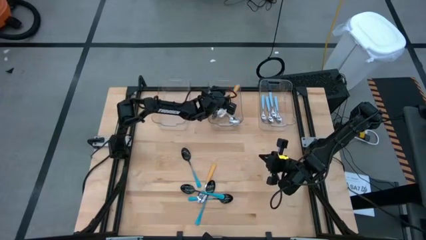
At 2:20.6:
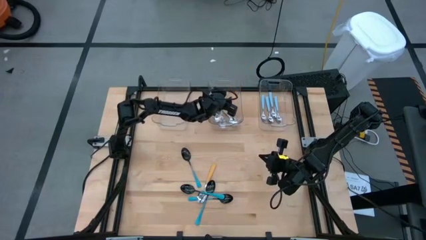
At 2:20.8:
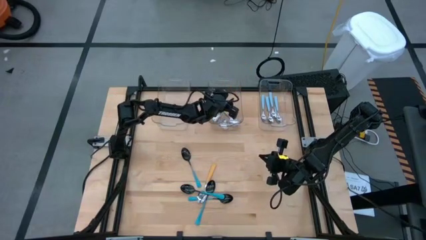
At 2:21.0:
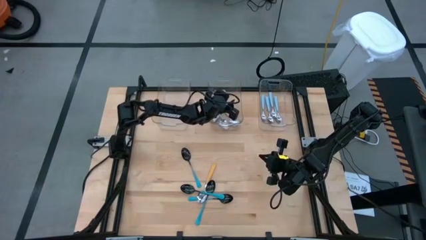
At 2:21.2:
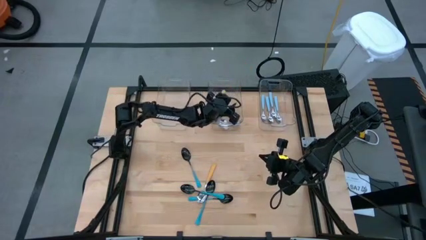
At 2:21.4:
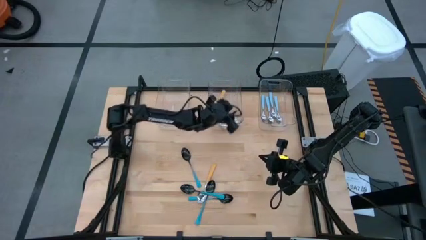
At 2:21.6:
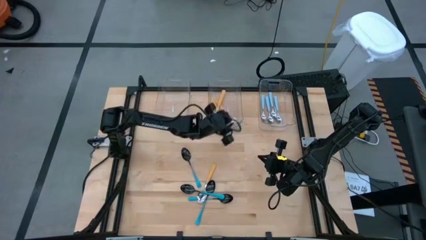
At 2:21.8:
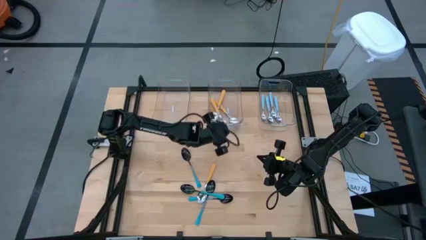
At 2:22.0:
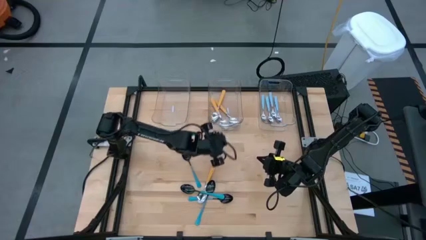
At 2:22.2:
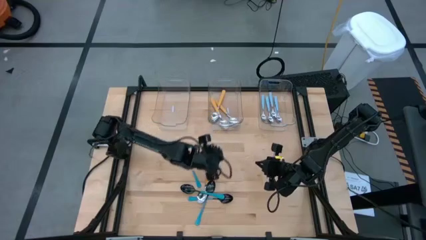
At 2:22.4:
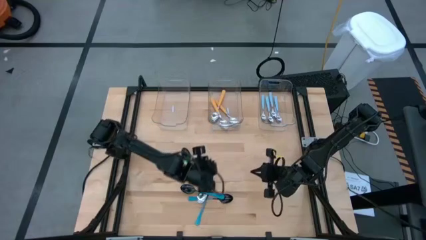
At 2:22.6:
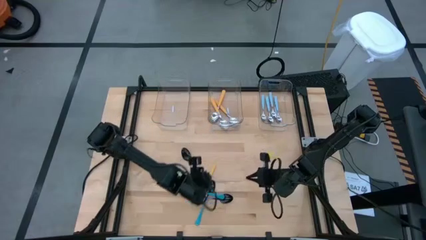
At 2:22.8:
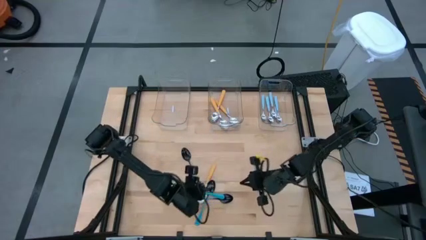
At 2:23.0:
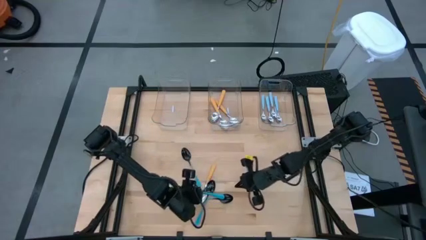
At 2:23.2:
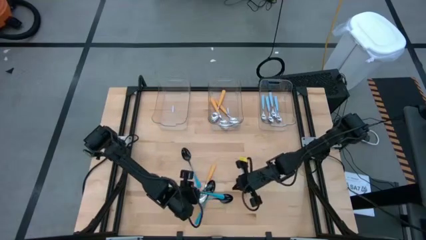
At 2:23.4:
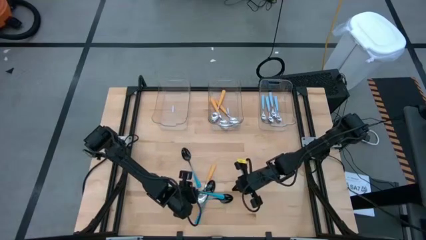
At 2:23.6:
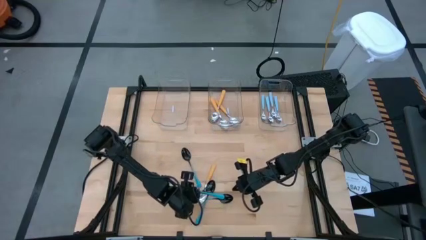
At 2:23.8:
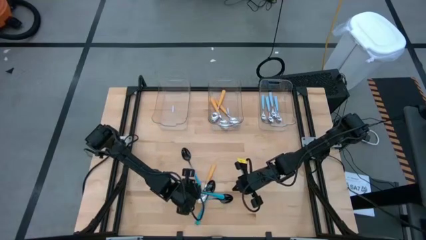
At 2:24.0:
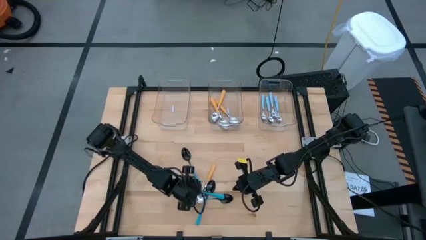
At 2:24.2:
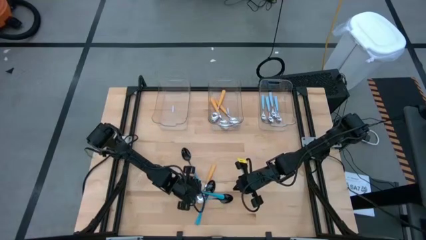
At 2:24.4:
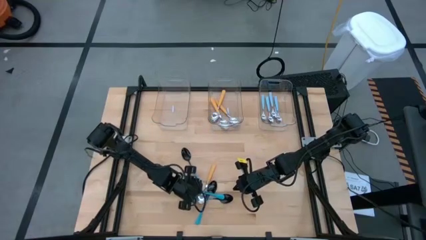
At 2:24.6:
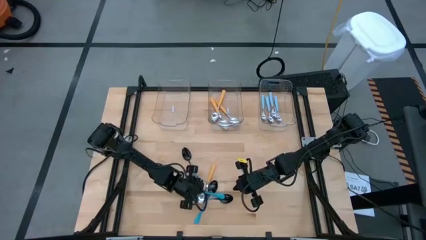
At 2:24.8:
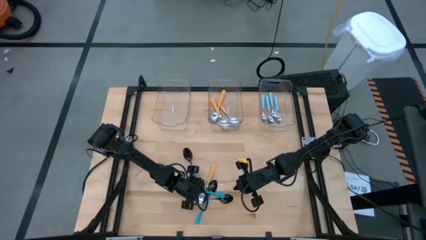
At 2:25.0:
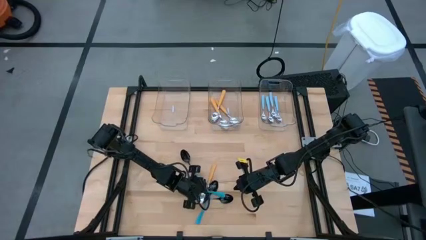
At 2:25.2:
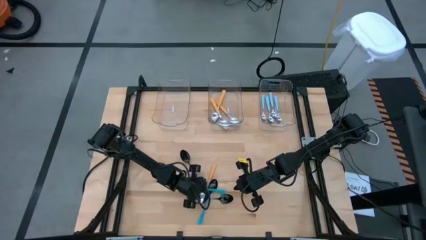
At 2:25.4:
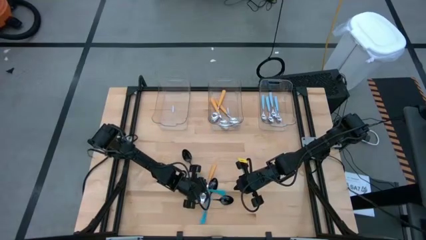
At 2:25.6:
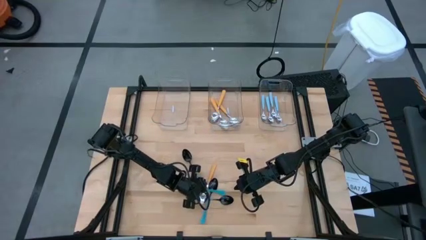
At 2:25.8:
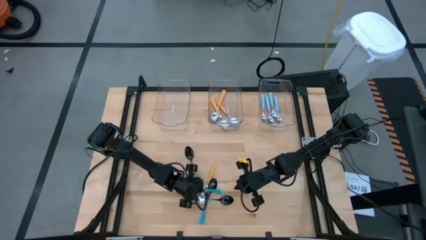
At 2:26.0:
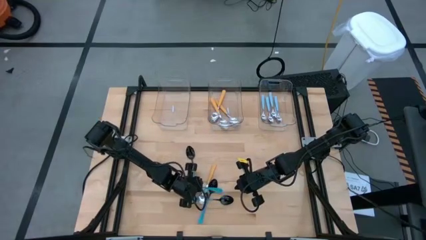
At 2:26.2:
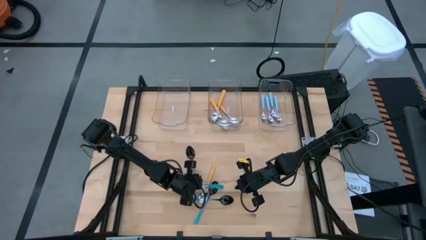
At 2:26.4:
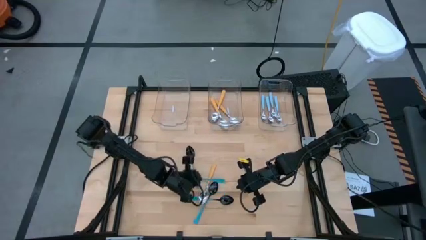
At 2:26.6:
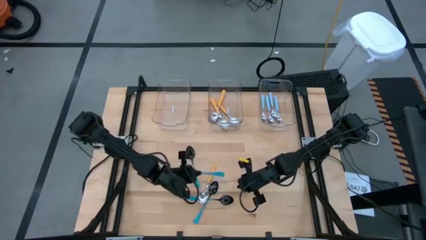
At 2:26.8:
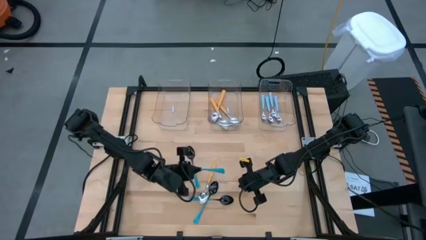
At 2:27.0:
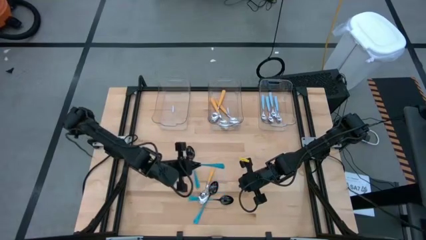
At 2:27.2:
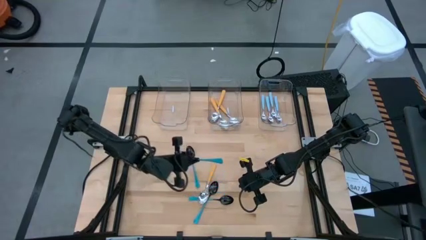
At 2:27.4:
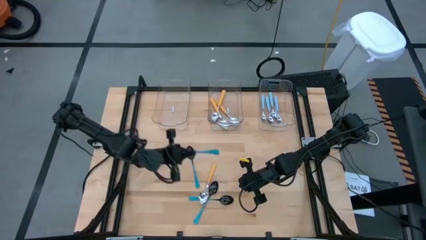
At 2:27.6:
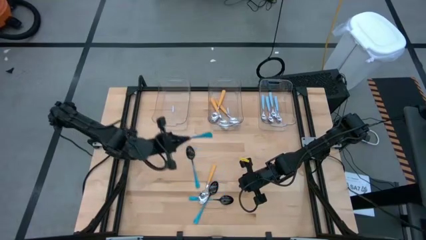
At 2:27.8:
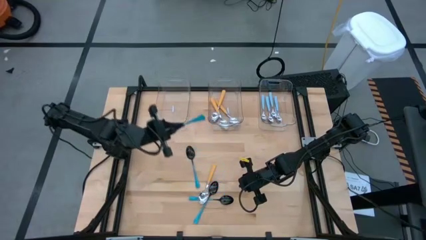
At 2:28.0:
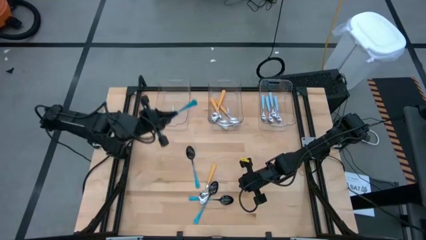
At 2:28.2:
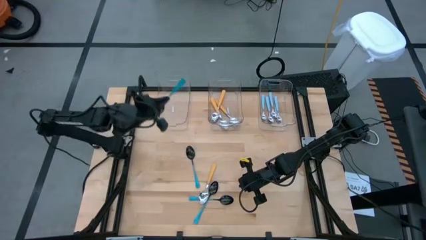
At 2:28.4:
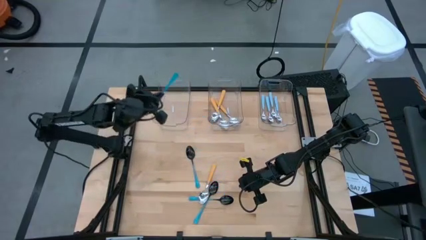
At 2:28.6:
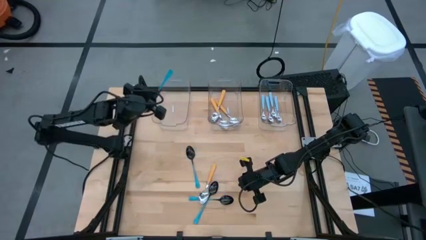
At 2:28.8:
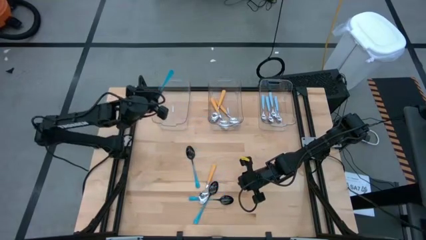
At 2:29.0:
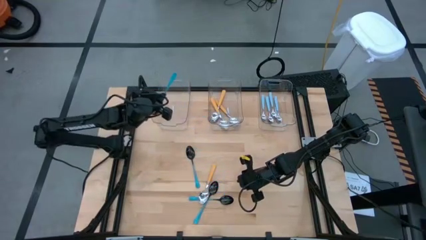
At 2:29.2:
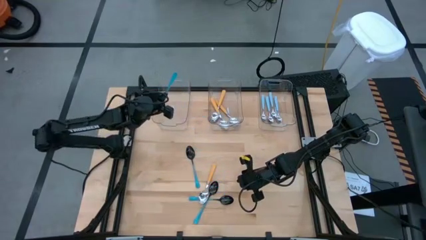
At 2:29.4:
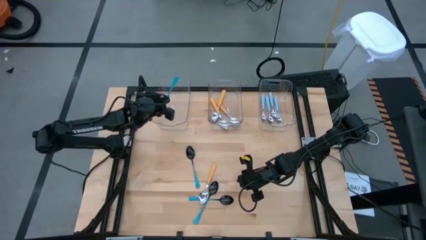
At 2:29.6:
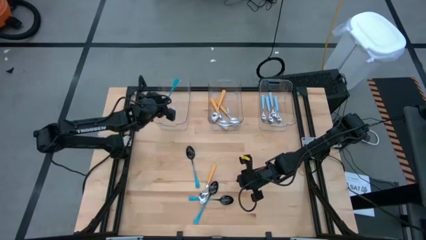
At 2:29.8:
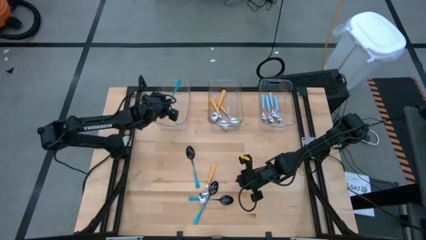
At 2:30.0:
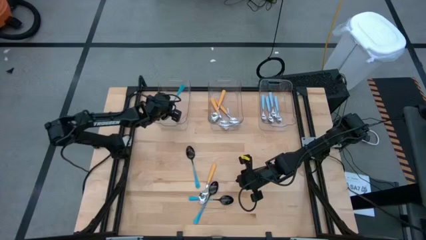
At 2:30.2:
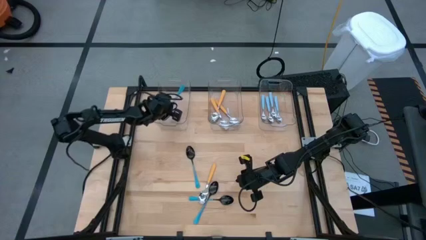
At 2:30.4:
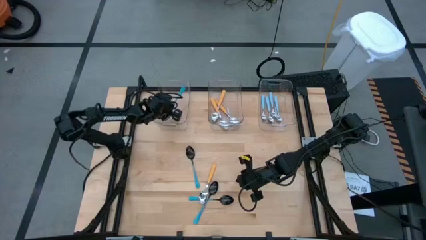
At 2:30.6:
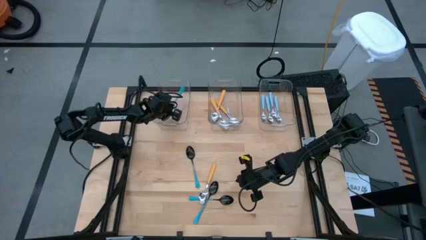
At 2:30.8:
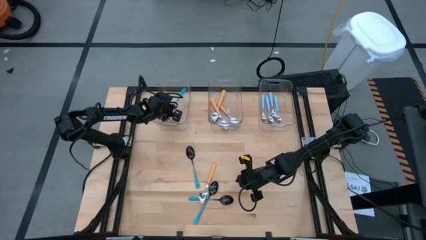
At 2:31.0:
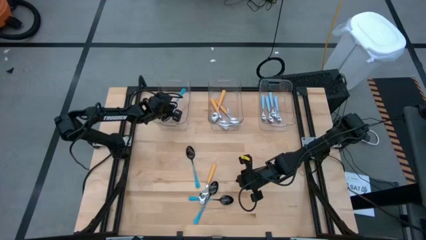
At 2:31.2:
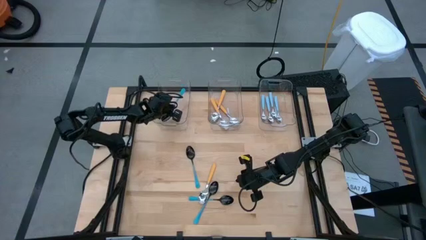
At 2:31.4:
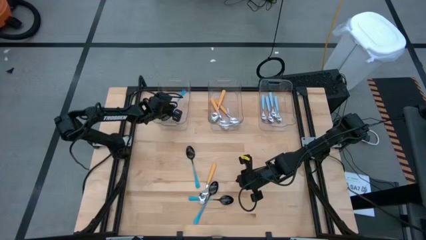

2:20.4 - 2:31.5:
Task: Sort silverware by color (type)
Put the blue spoon into the left transparent bin

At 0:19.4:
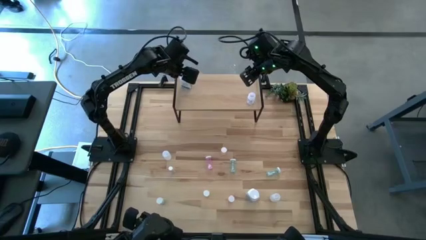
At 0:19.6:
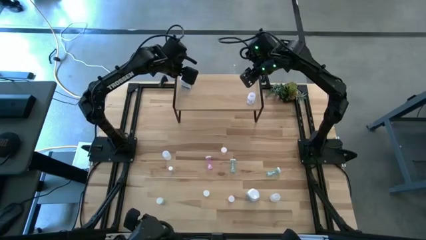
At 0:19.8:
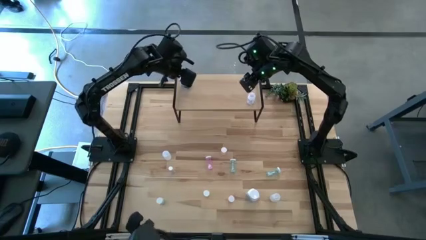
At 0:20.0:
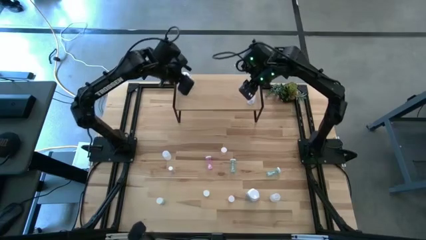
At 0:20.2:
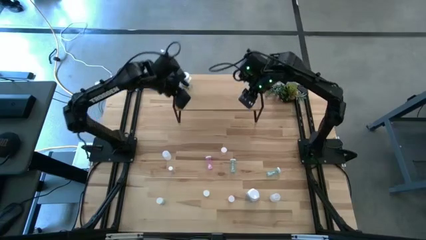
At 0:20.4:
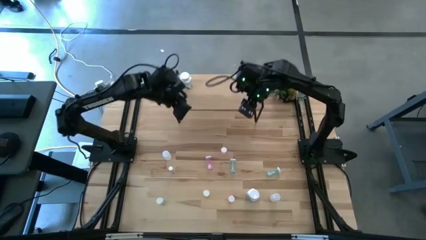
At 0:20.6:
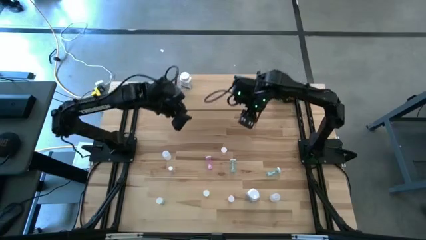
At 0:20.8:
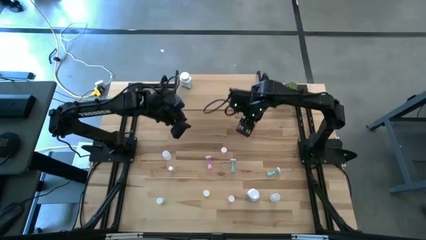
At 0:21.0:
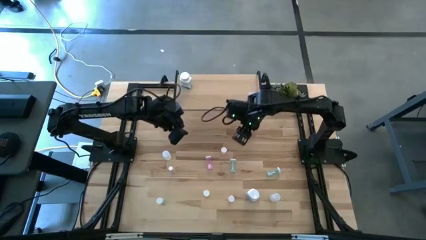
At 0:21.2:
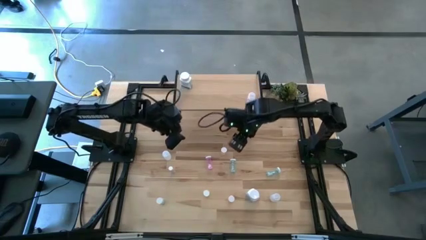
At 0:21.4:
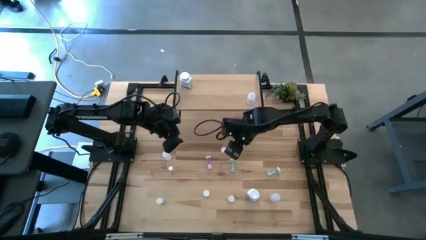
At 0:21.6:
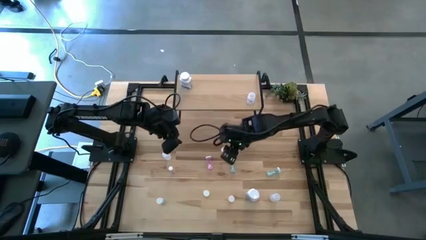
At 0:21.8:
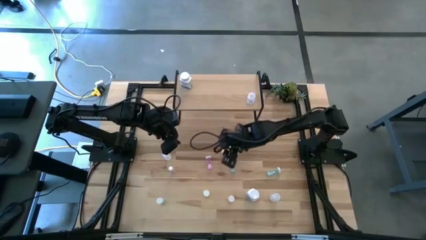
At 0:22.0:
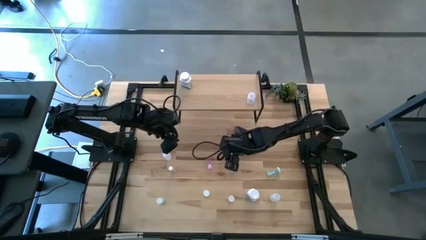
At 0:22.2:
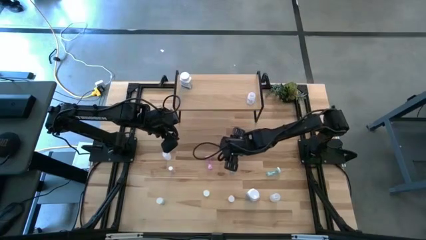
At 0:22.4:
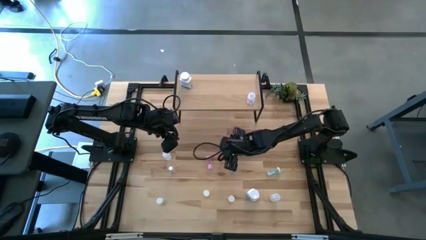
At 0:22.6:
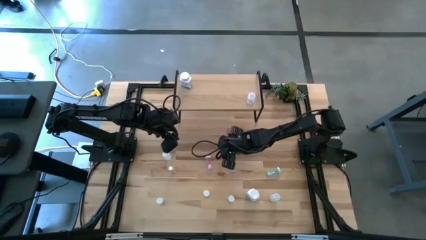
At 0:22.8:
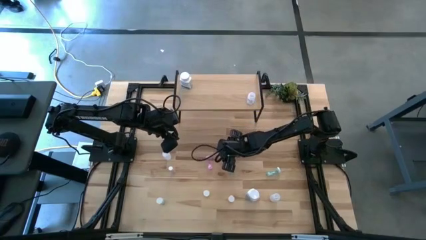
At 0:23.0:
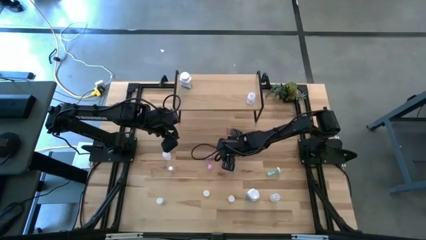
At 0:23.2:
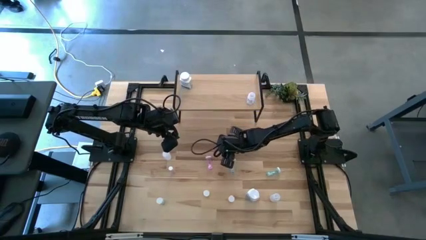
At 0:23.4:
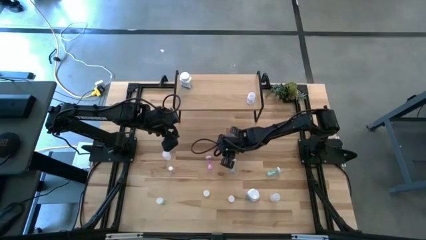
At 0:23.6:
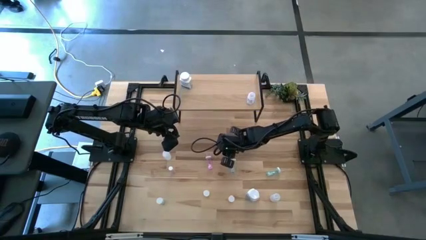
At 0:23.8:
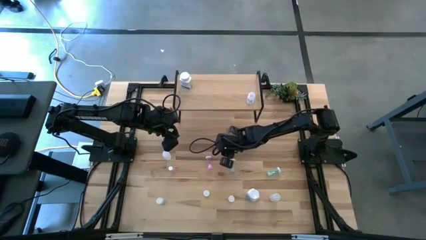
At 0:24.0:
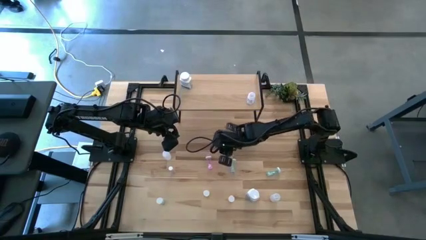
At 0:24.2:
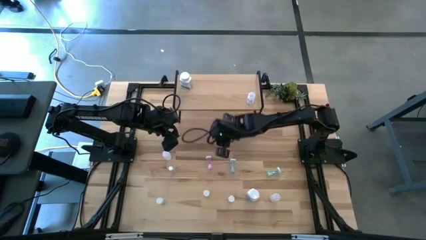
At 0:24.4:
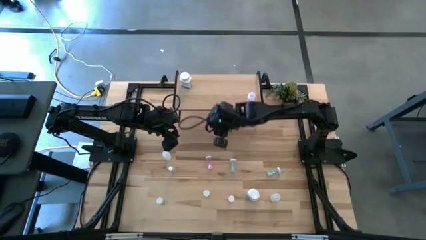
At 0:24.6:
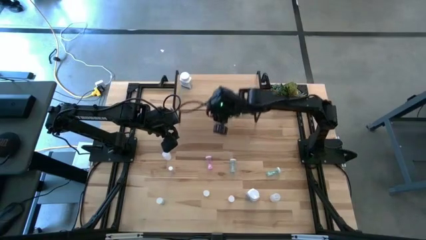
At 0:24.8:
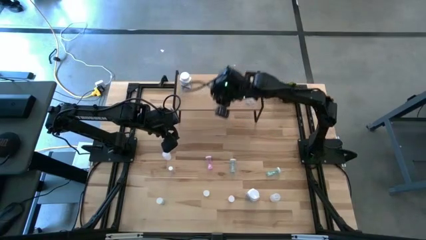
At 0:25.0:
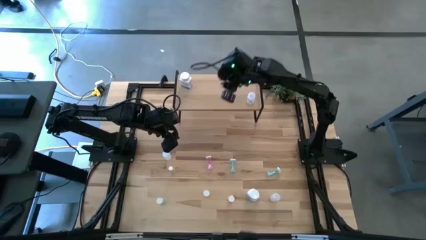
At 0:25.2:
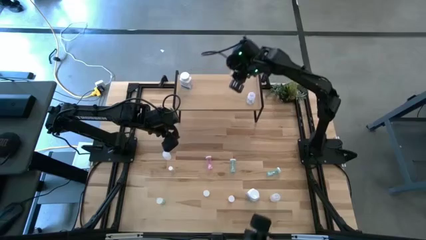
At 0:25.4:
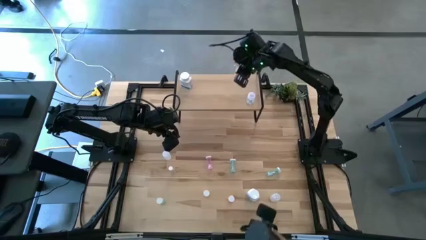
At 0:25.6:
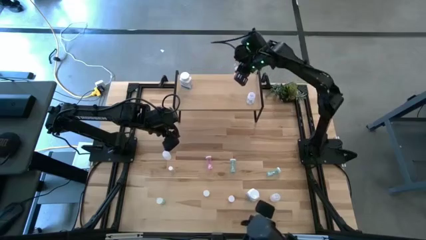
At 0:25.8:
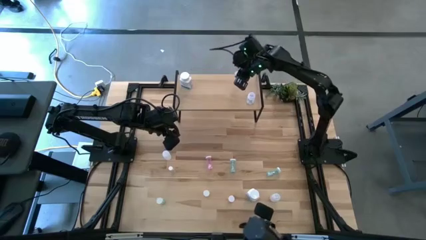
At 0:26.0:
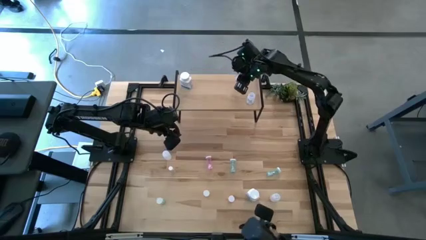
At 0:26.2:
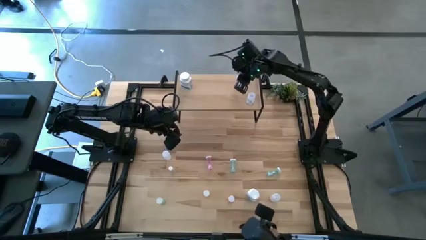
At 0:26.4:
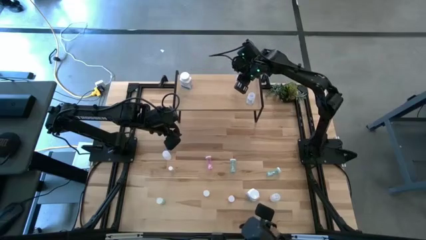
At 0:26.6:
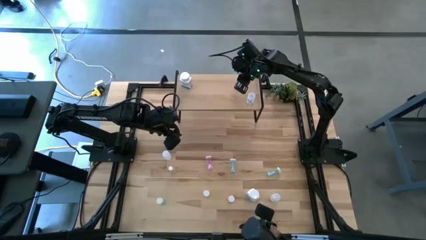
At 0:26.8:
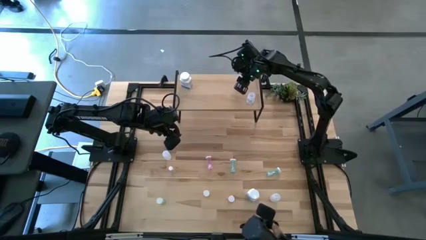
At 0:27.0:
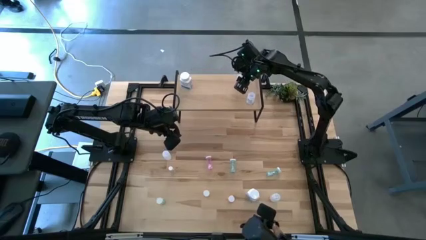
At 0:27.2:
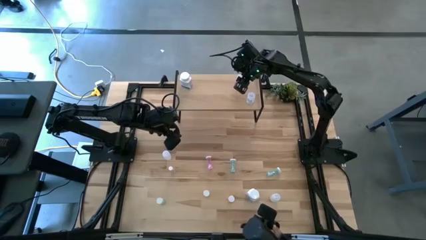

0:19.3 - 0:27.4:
Task: Pick and place medicine bottles onto shelf by color
Put the top red medicine bottle on the shelf
